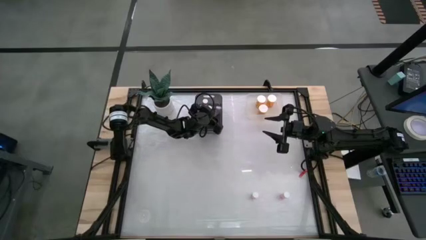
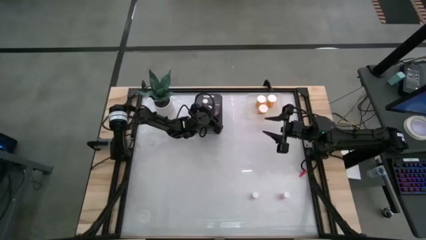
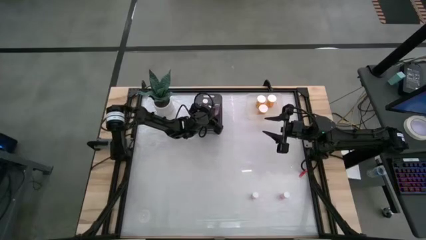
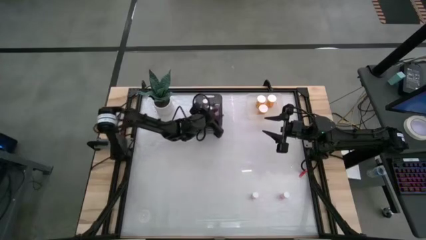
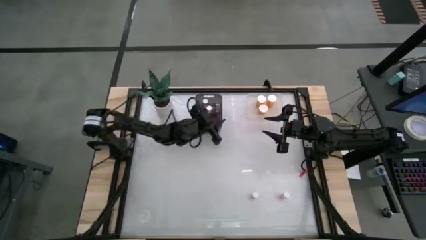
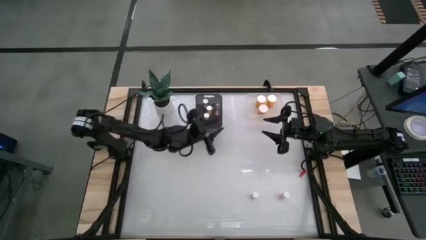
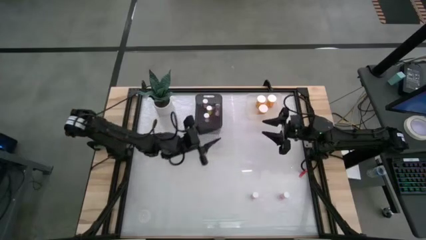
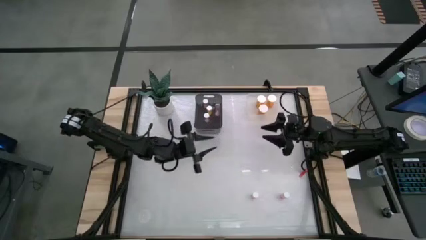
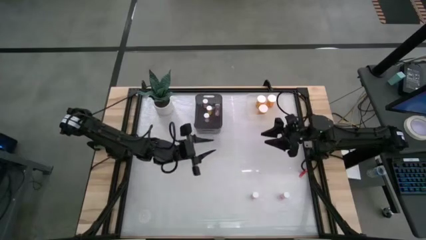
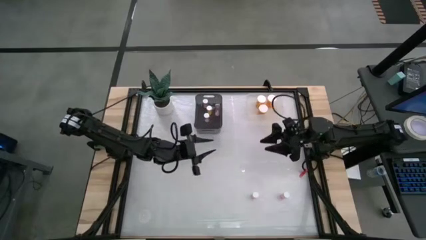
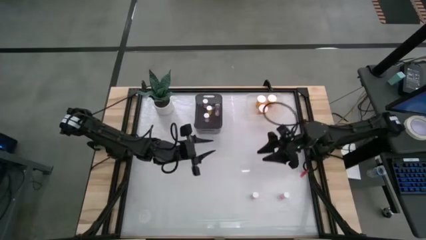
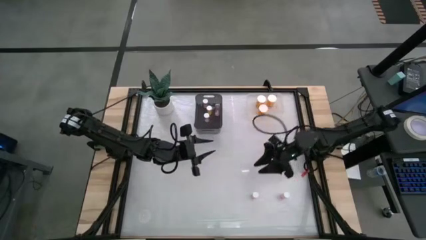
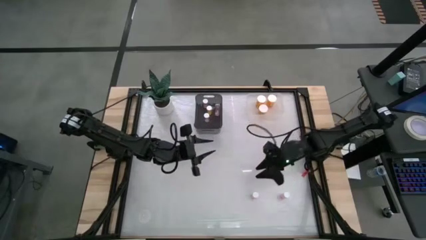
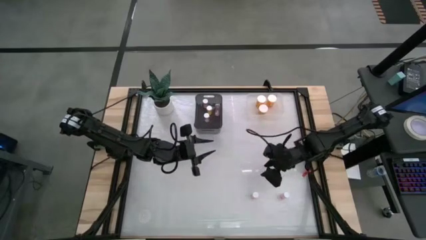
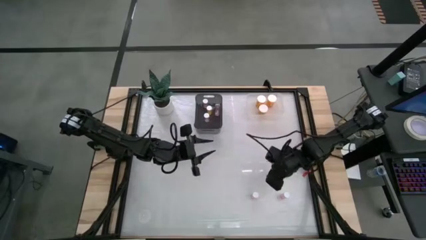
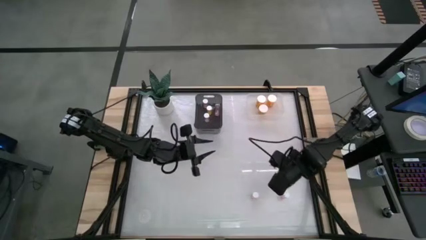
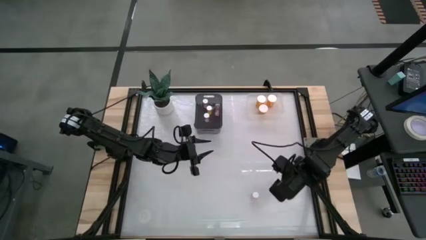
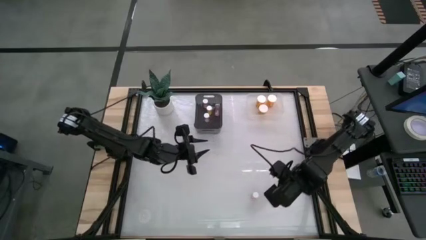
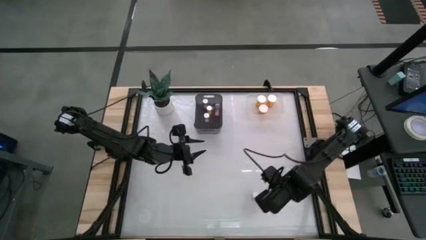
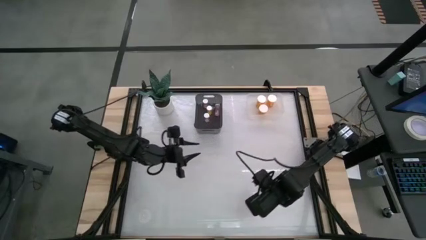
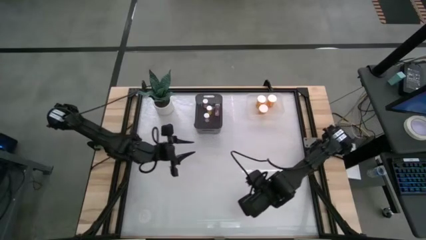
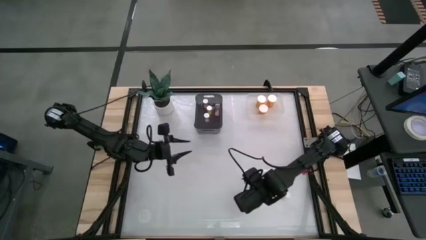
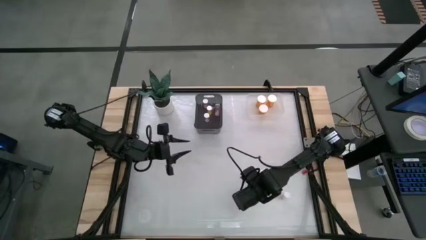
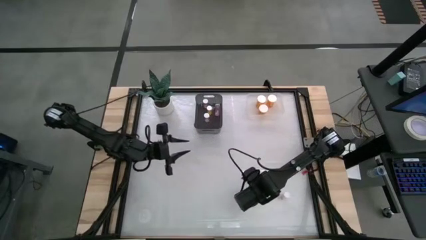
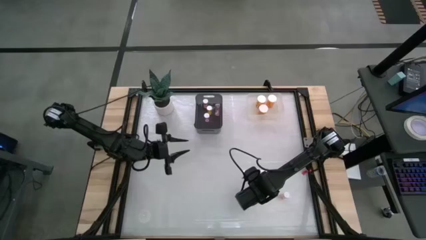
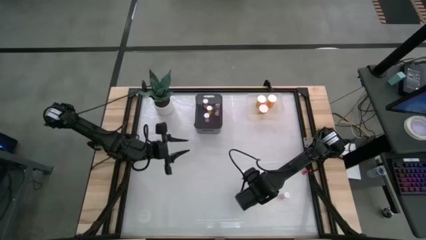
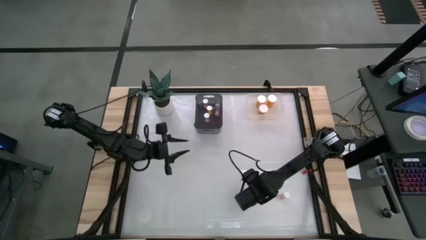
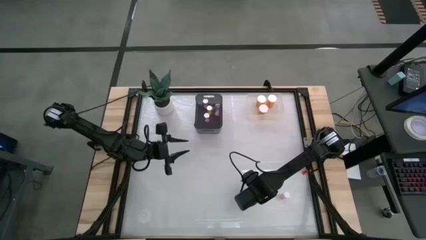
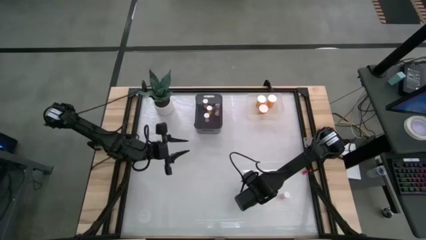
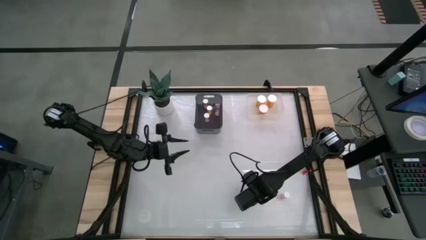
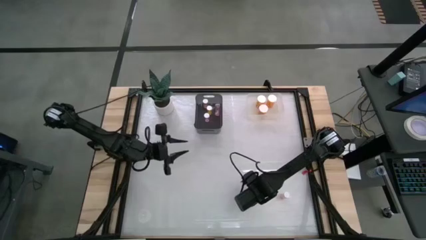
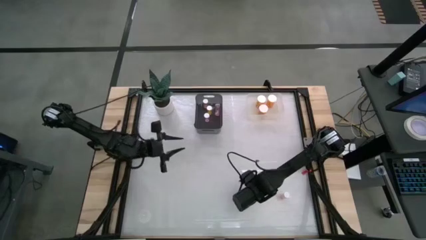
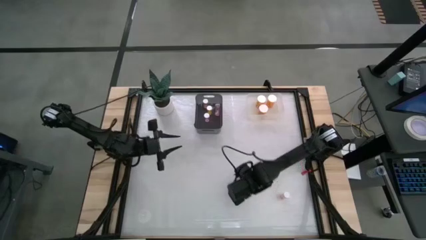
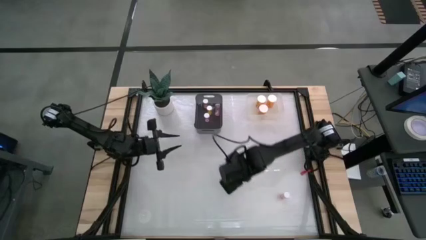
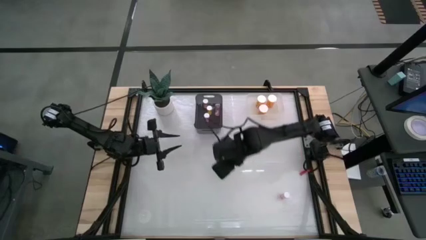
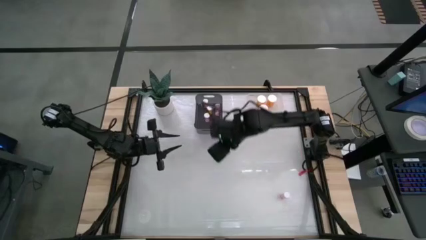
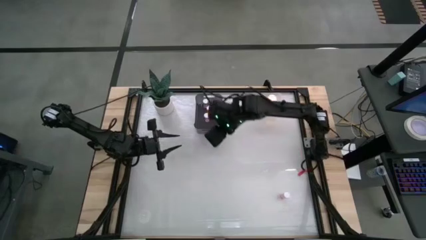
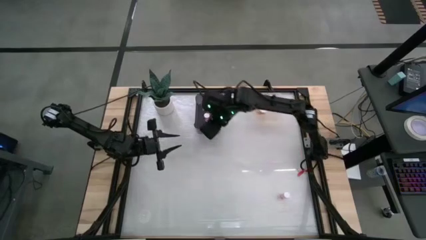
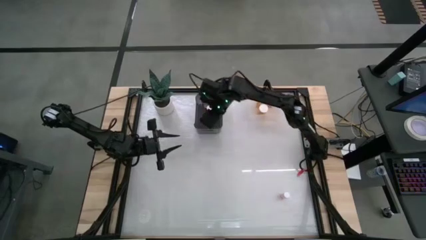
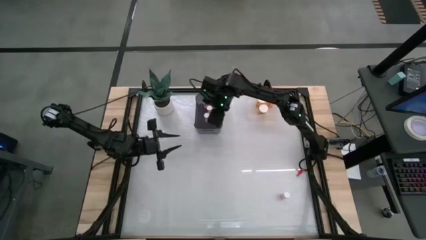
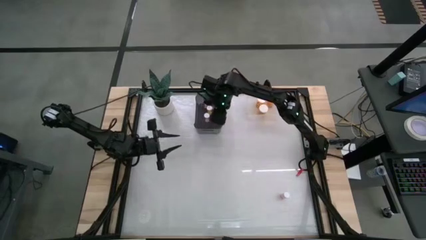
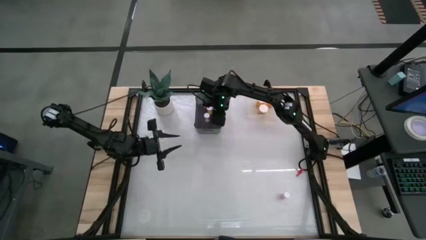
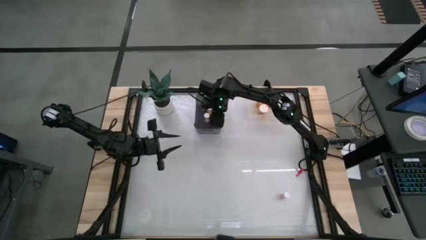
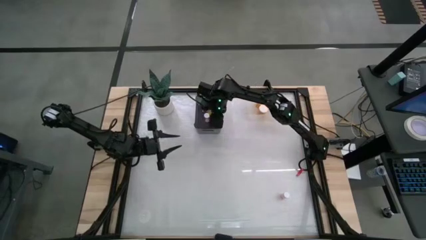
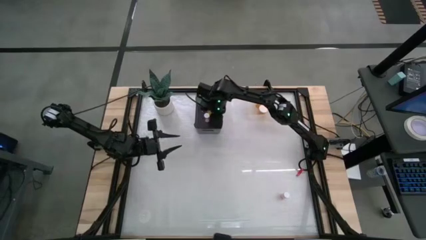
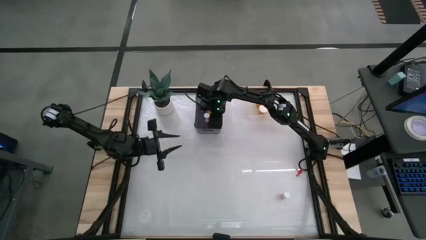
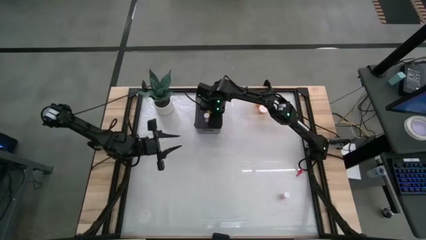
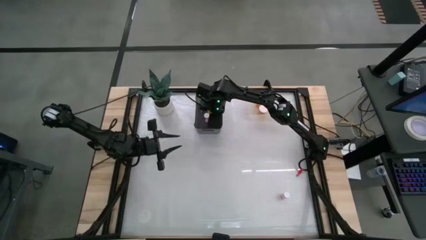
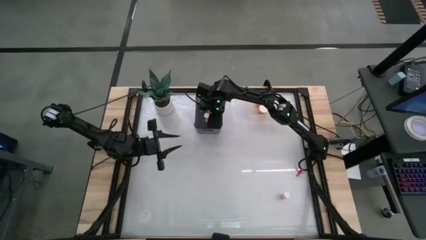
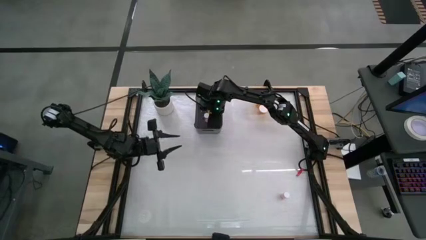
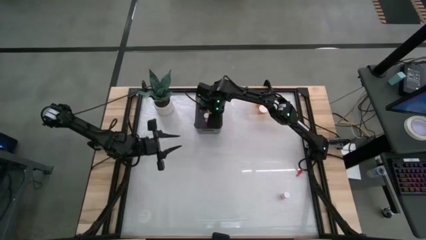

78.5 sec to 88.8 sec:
Task: Pick and place medicine bottles into bin by pill shape (circle, oval)
Put the small pink pill bottle into the black bin
